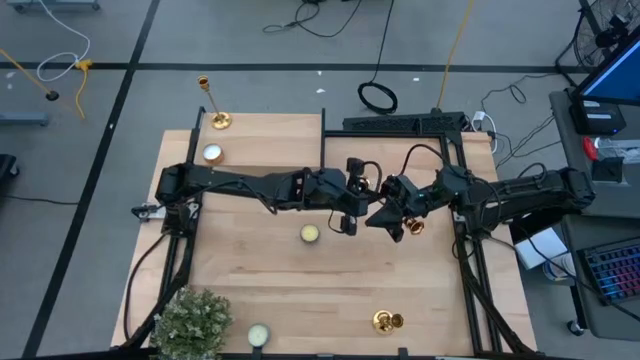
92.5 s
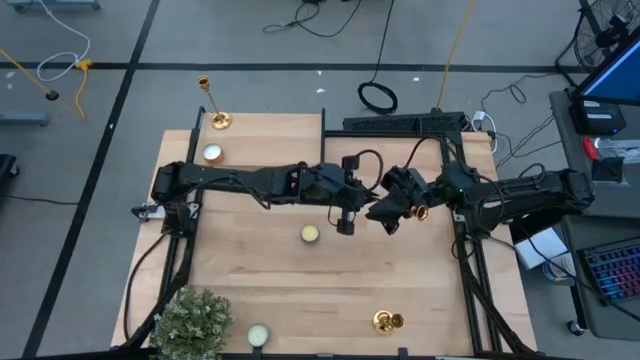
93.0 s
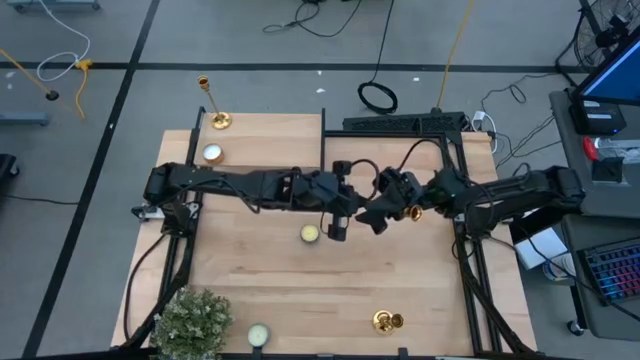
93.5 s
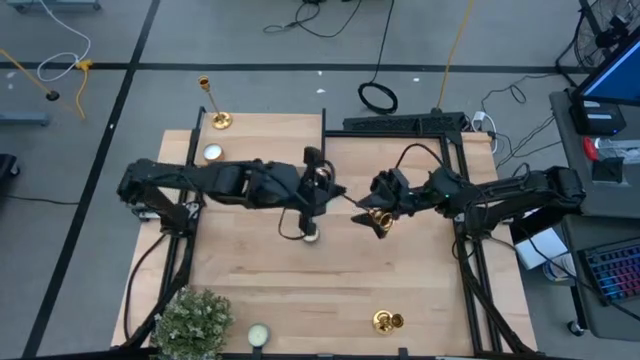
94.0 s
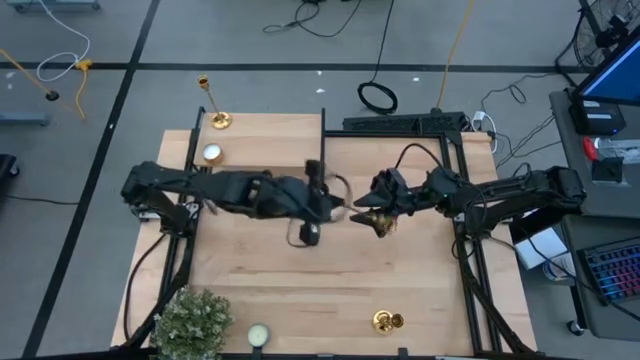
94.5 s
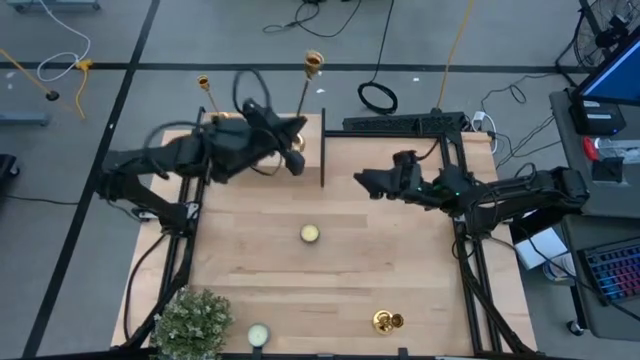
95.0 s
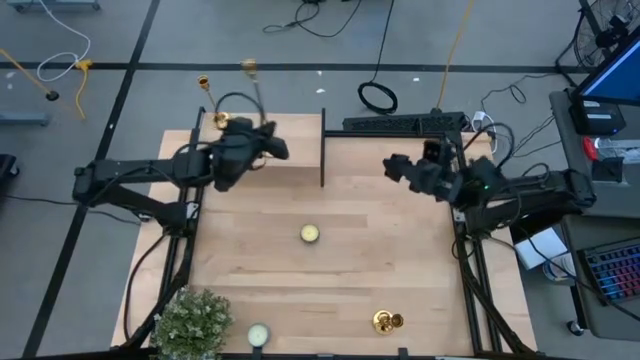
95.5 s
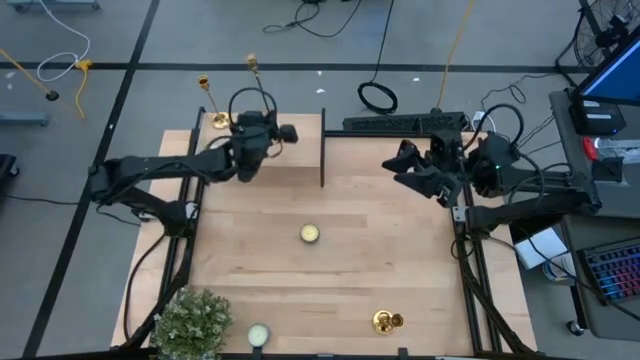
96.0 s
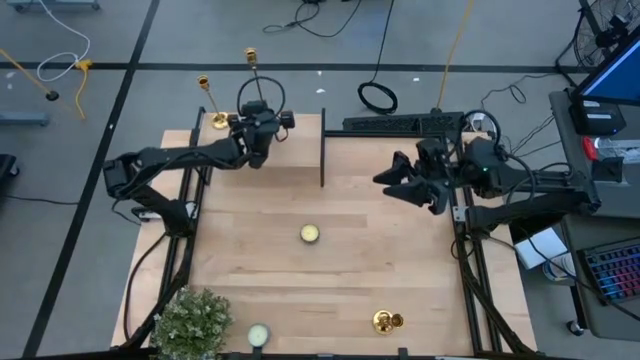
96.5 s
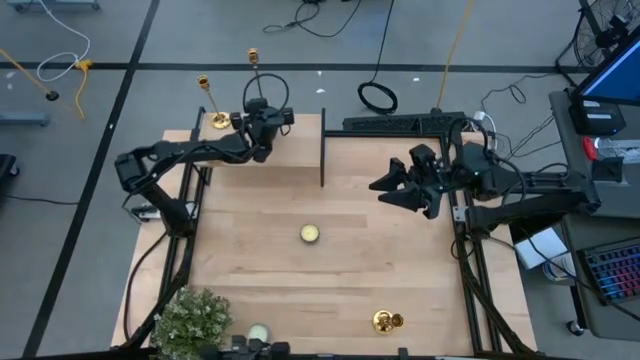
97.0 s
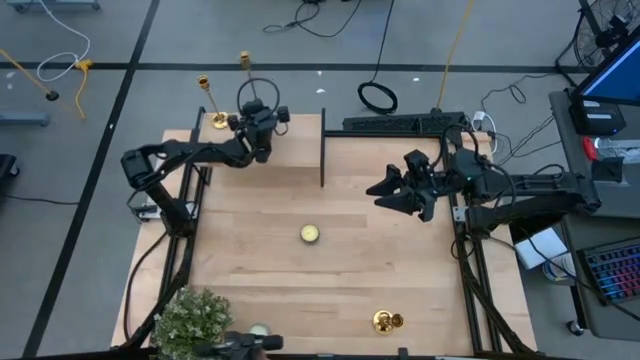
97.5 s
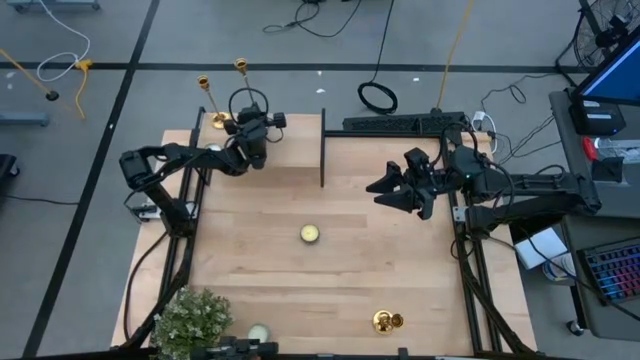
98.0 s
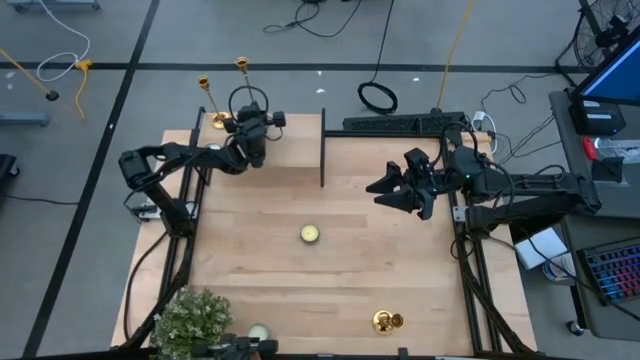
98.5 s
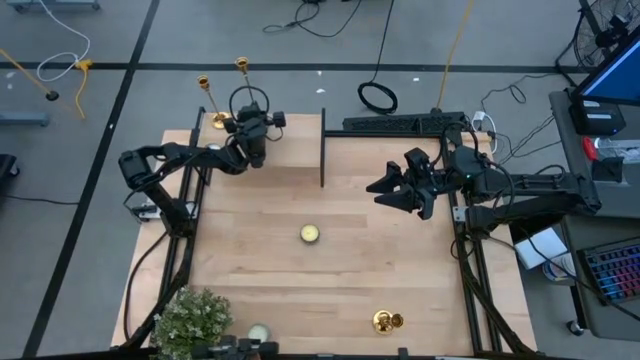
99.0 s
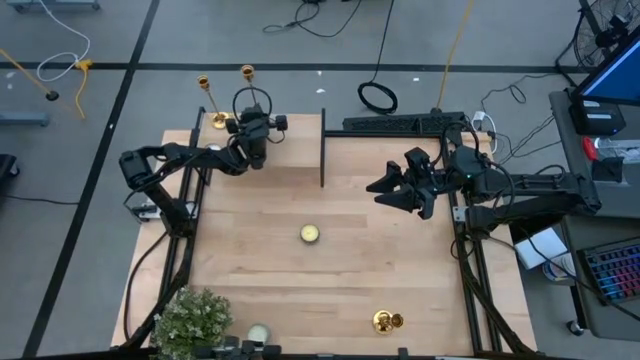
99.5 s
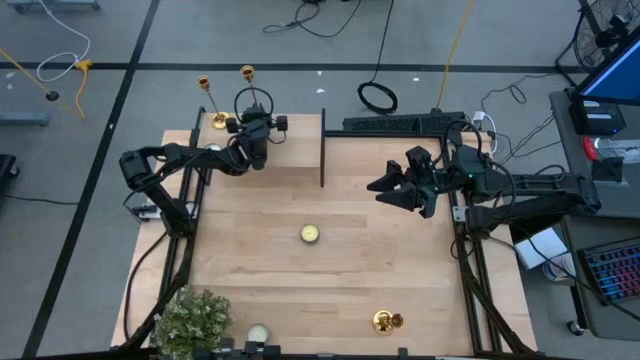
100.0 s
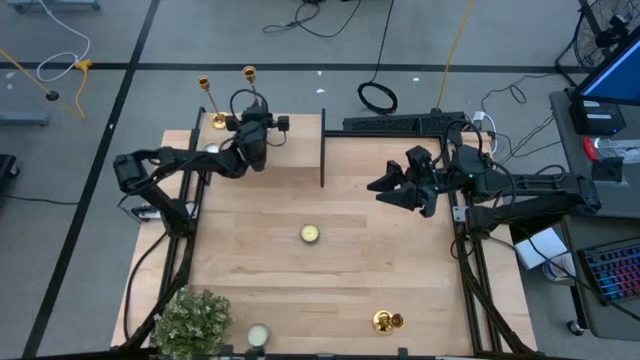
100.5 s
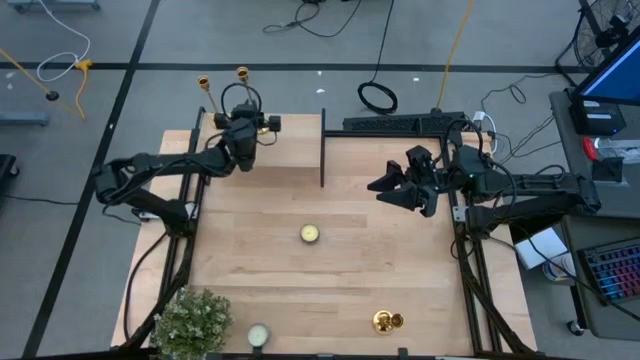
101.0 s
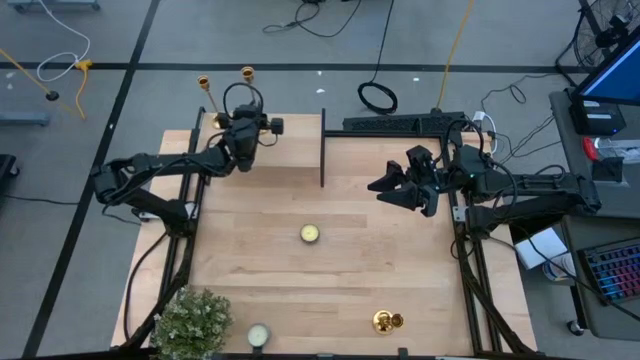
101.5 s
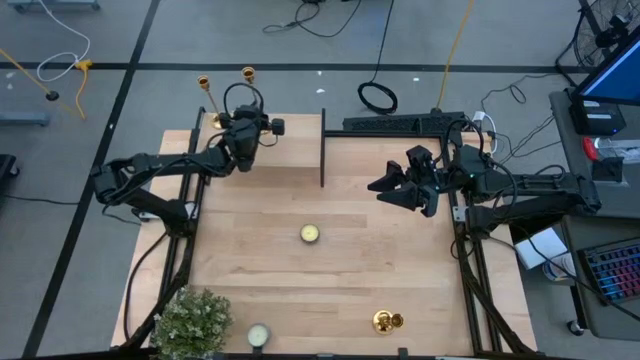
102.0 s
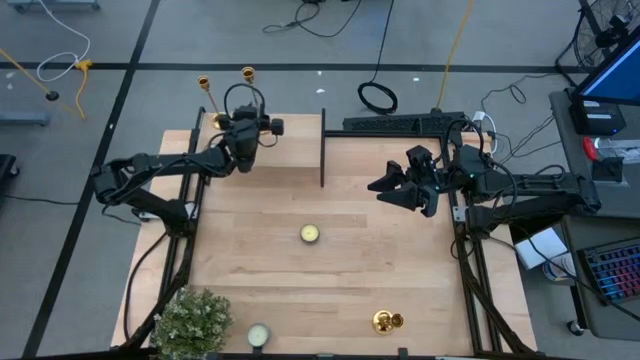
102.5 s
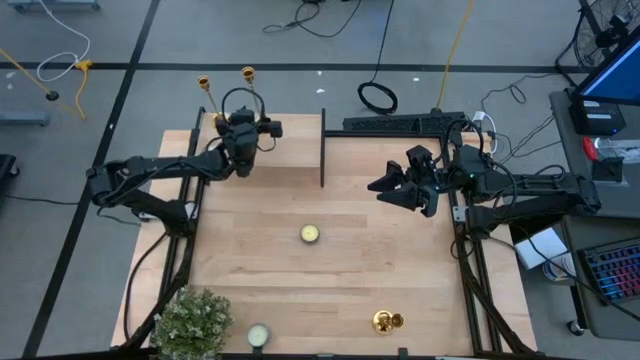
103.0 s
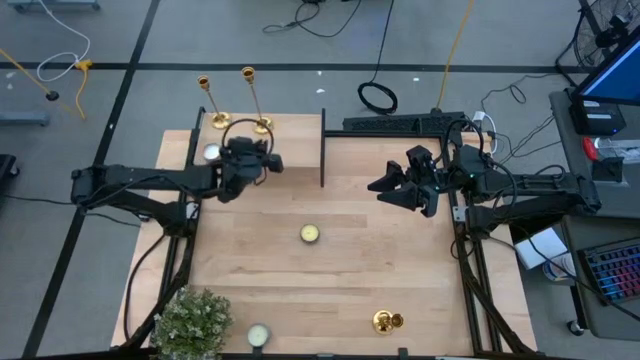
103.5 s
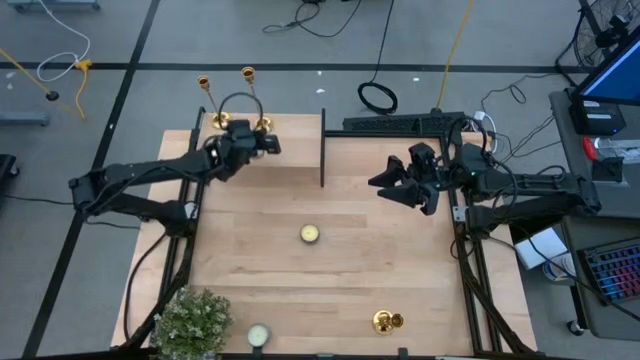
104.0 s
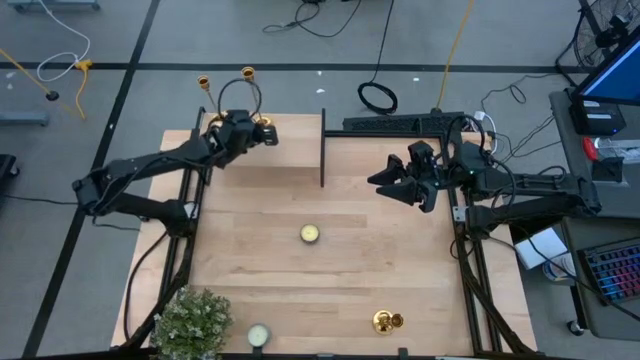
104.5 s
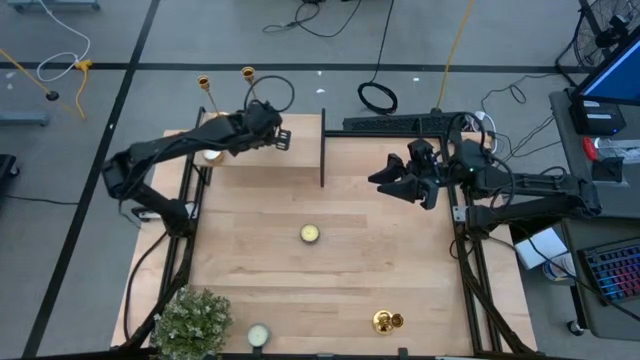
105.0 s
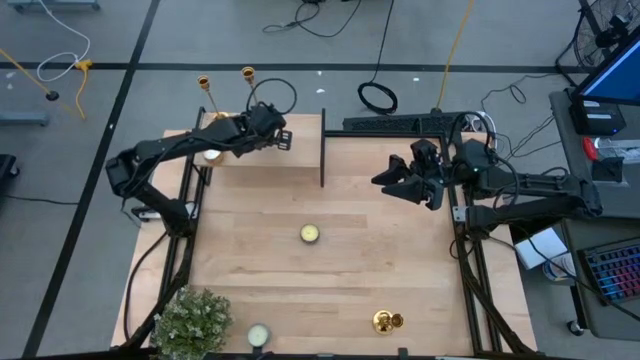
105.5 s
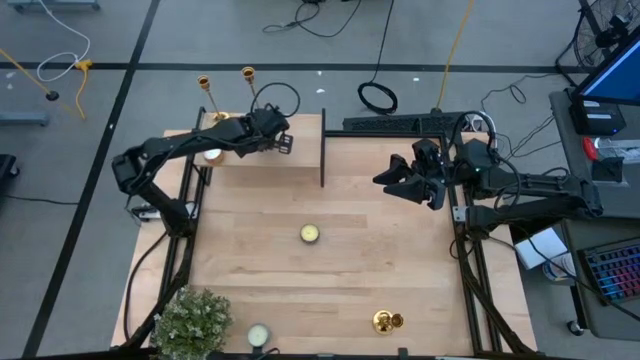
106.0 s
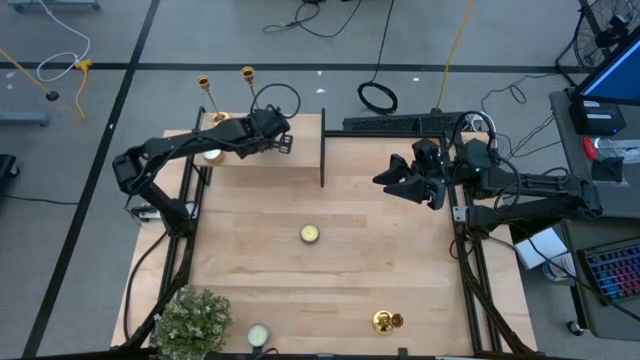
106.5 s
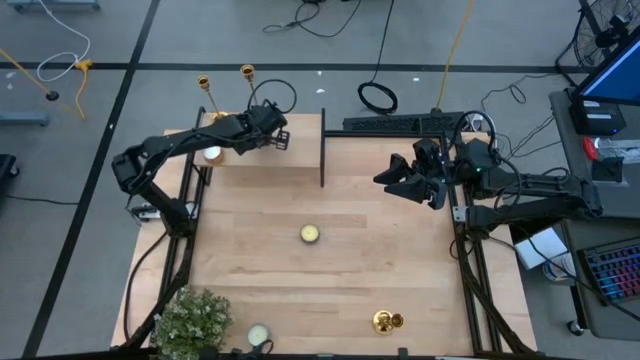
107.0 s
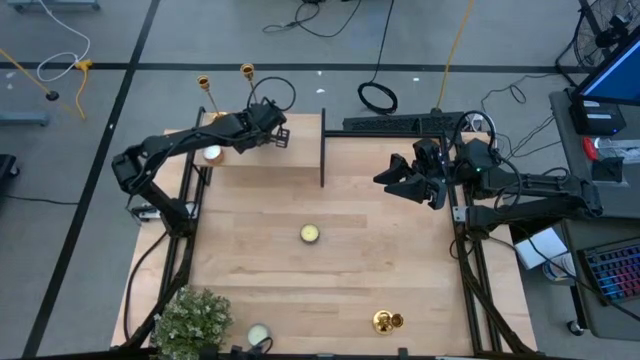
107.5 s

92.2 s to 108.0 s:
Task: Pick & Place candle stick holders
Put the top gold candle holder on the shelf
